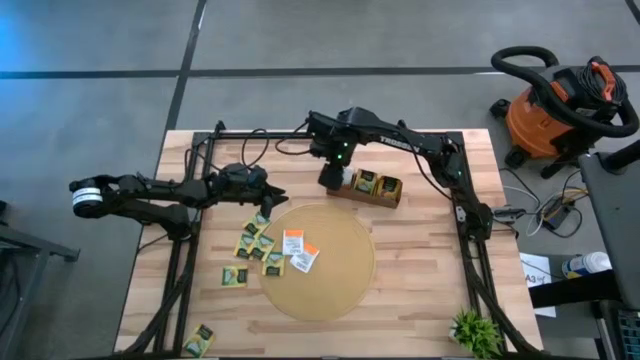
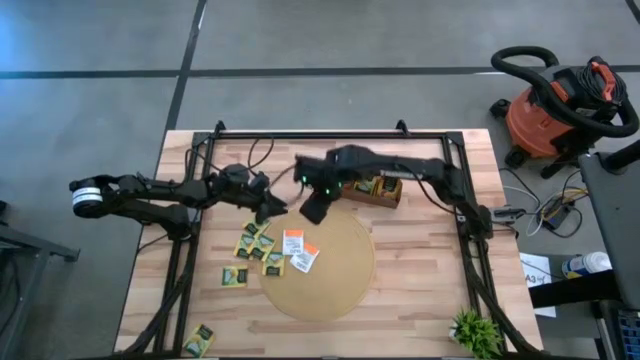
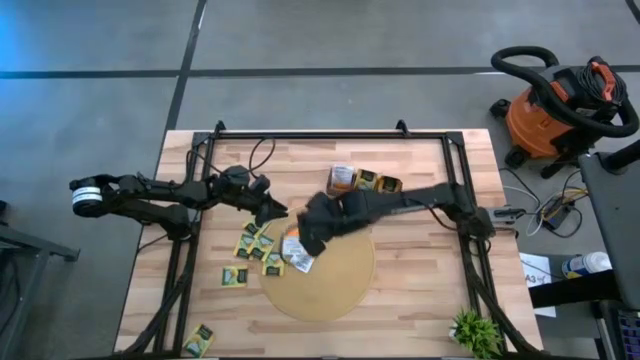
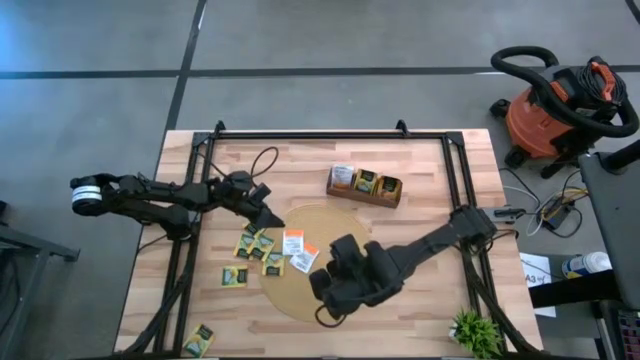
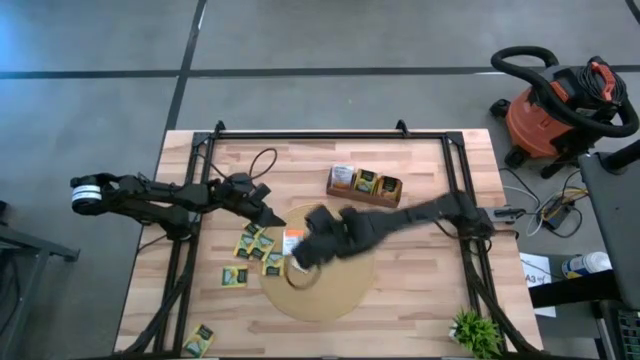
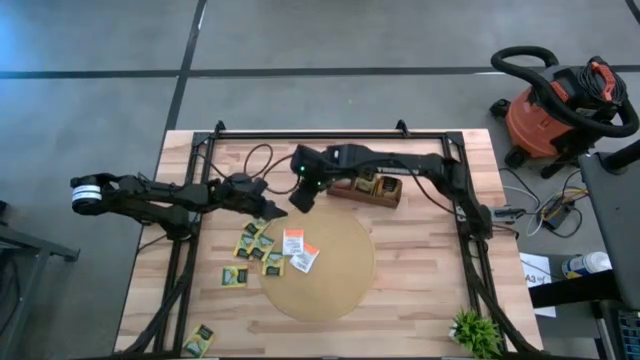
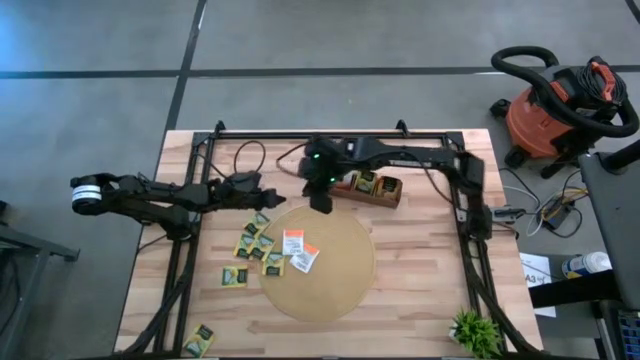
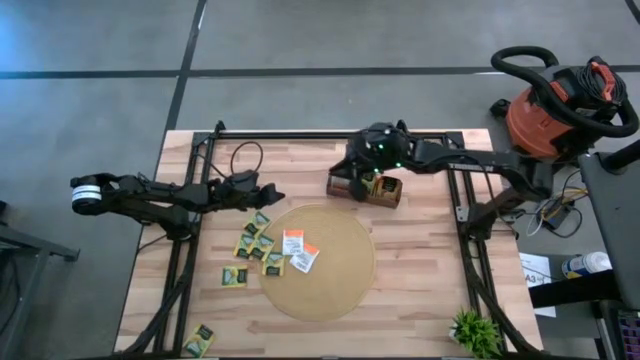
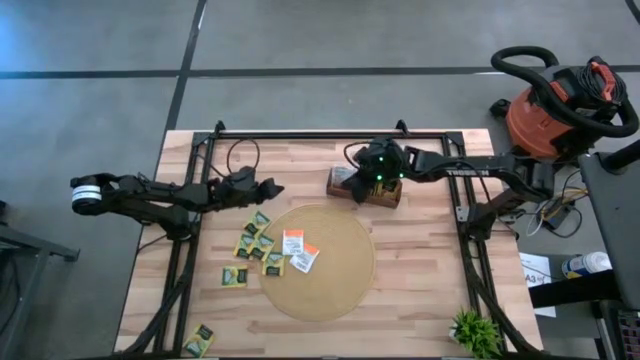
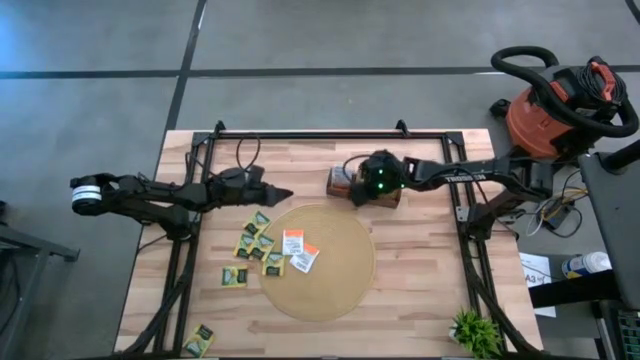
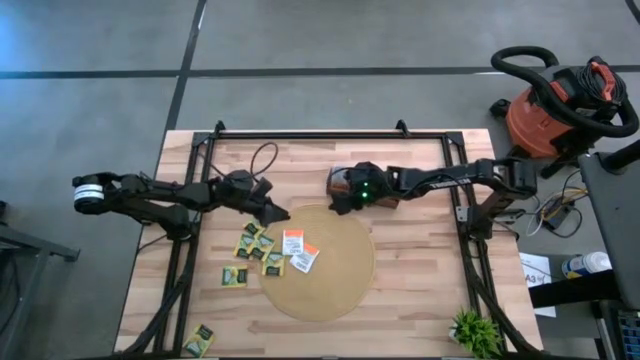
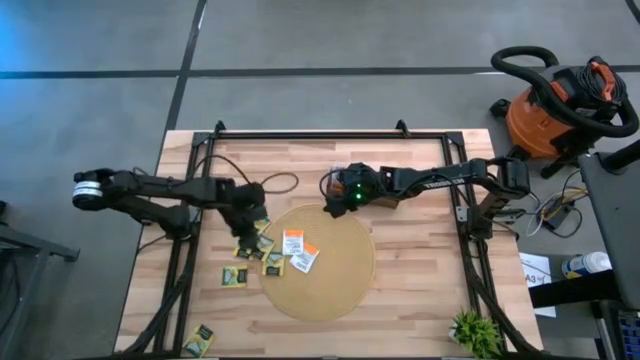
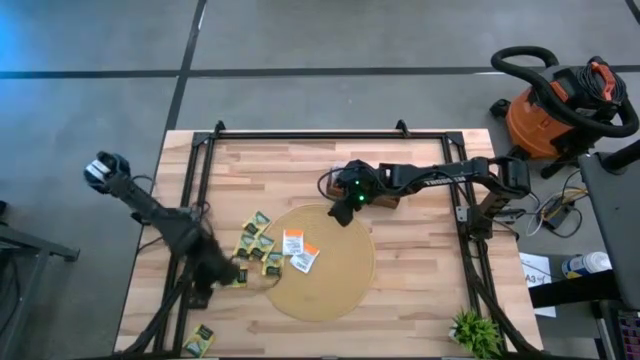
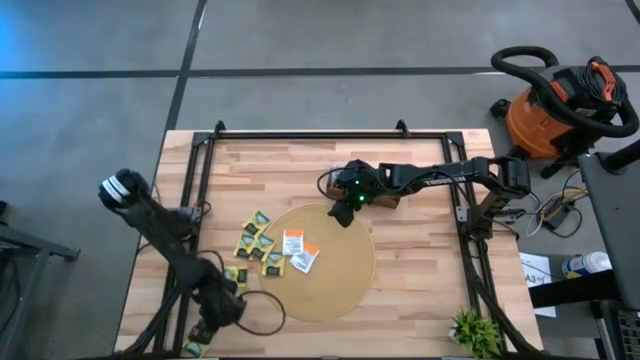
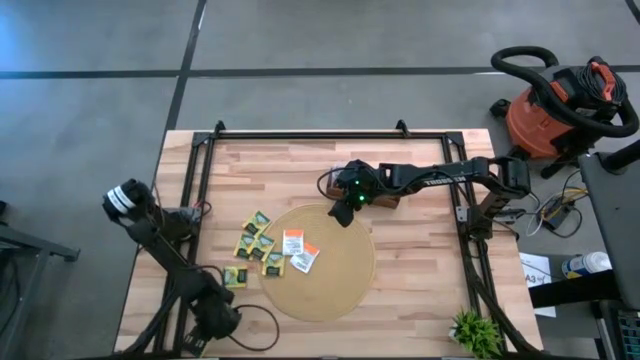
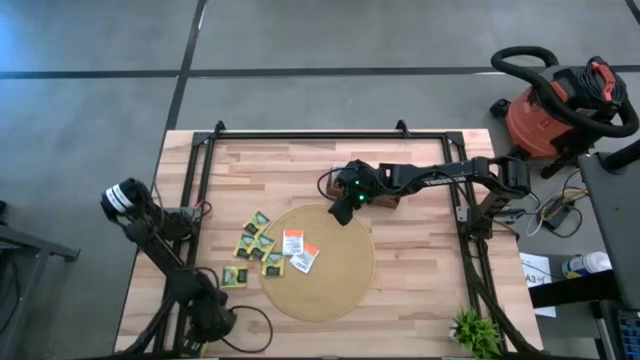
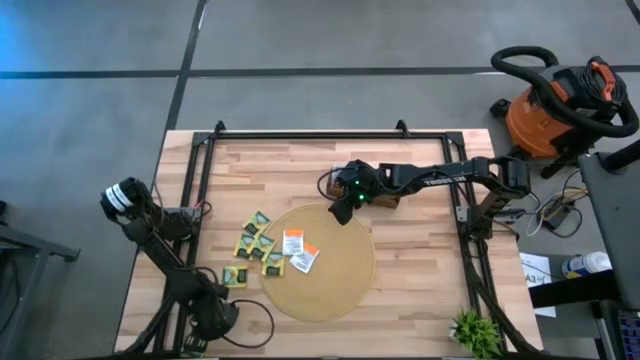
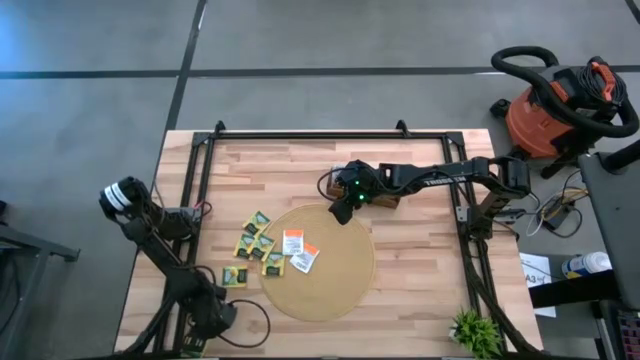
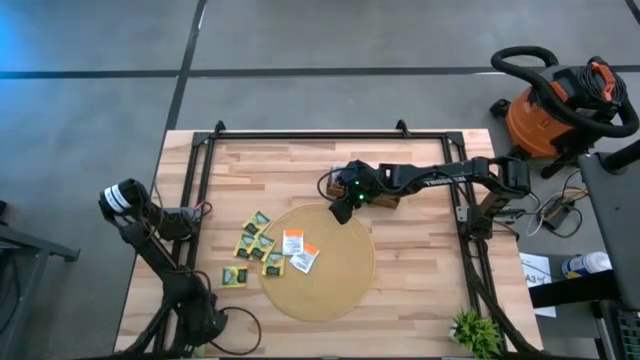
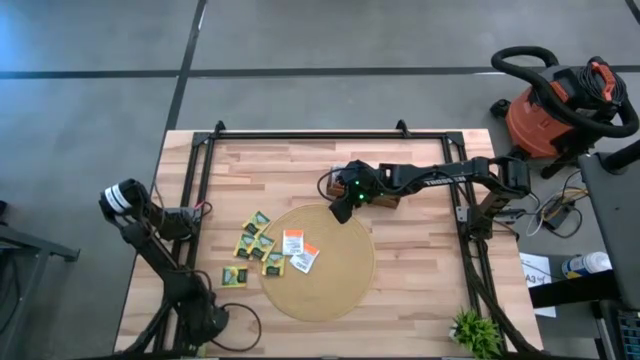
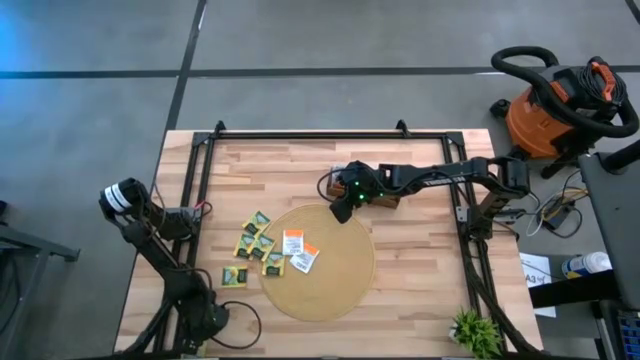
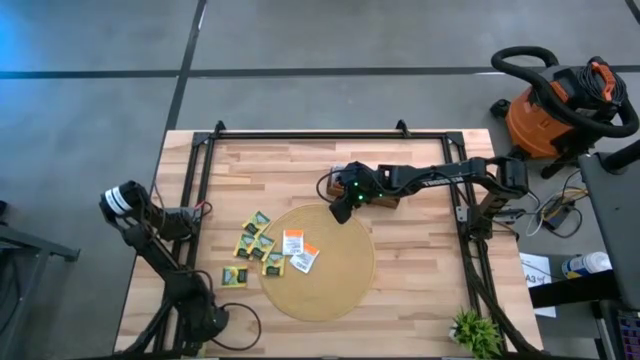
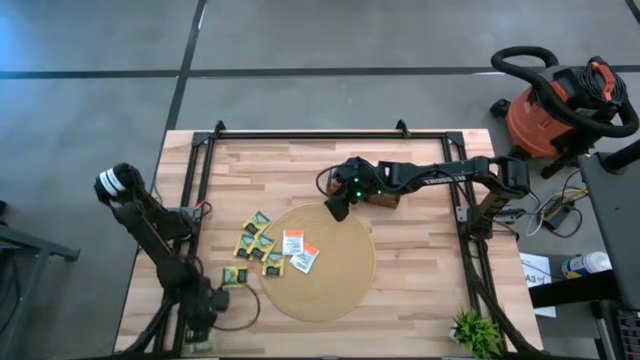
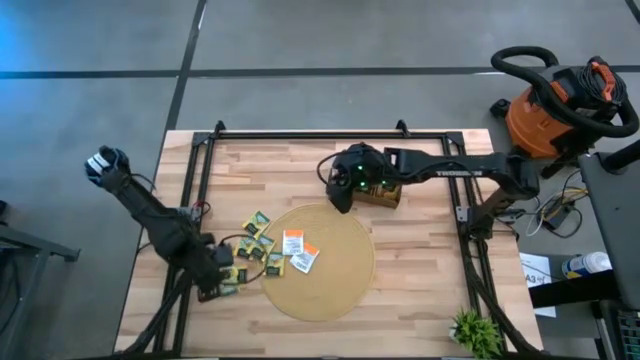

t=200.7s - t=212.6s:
Task: Pick & Place Tea
Put the lemon tea bag into the middle section of the wooden organizer
